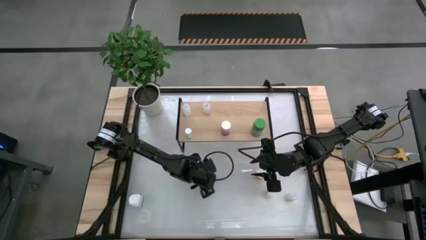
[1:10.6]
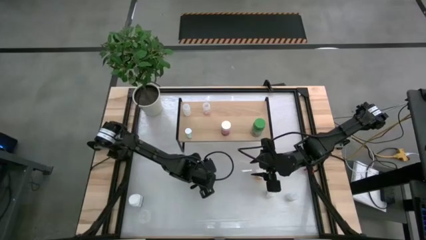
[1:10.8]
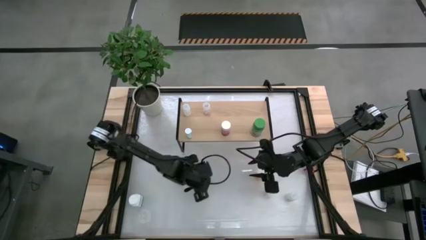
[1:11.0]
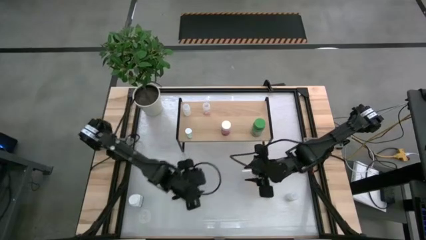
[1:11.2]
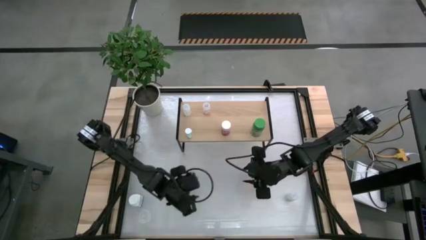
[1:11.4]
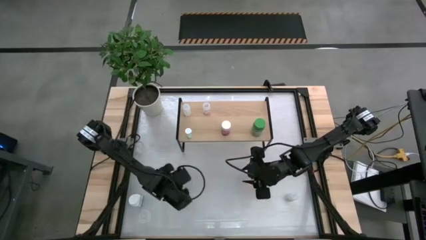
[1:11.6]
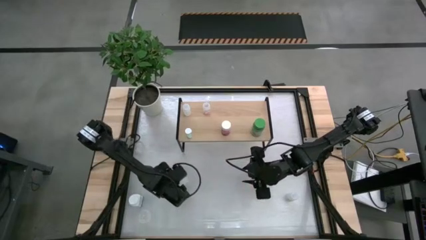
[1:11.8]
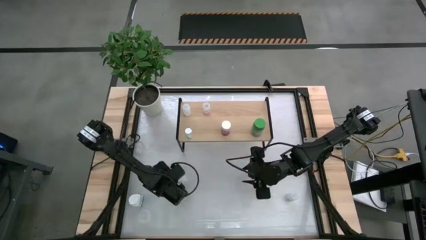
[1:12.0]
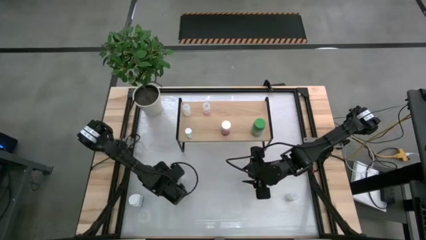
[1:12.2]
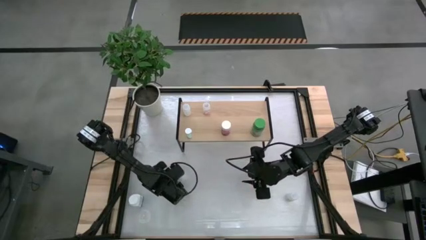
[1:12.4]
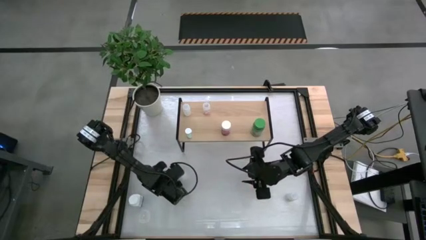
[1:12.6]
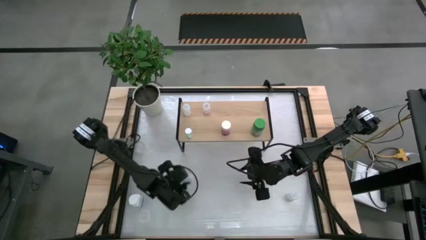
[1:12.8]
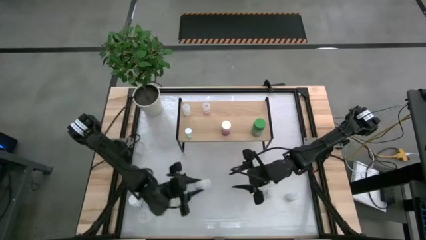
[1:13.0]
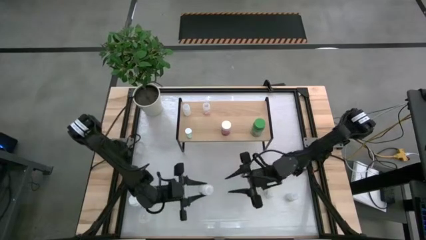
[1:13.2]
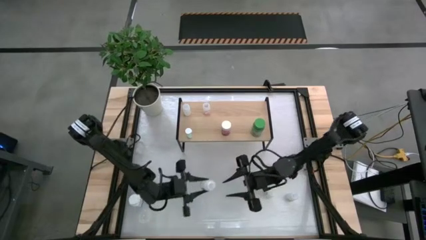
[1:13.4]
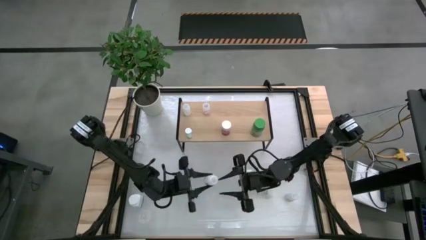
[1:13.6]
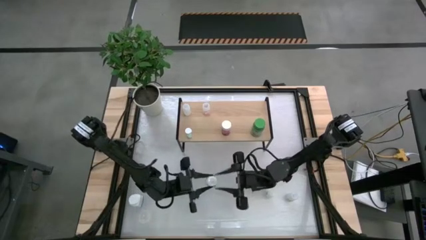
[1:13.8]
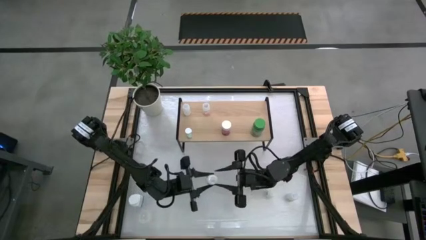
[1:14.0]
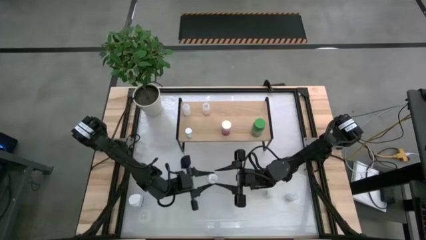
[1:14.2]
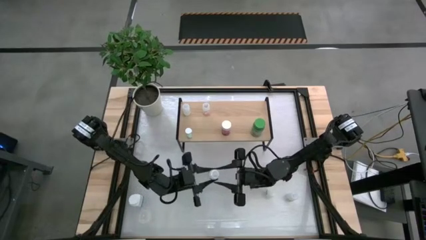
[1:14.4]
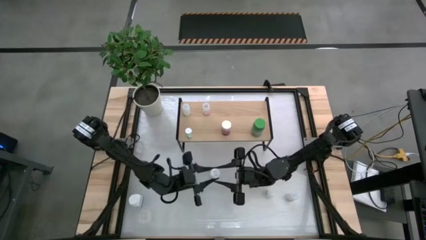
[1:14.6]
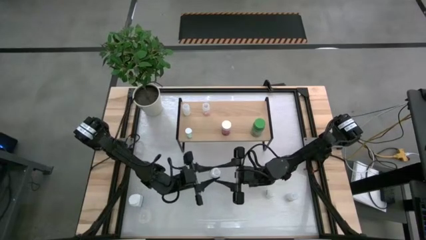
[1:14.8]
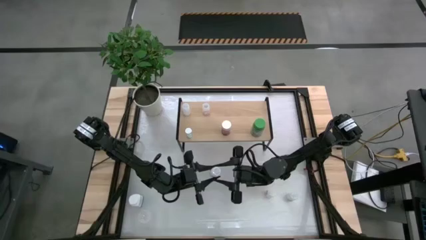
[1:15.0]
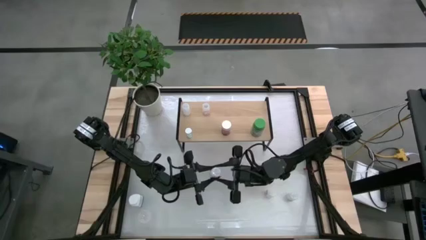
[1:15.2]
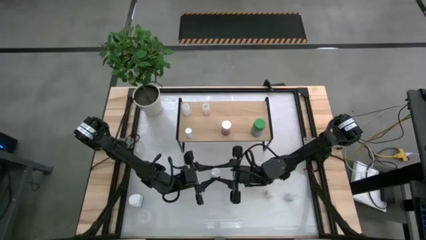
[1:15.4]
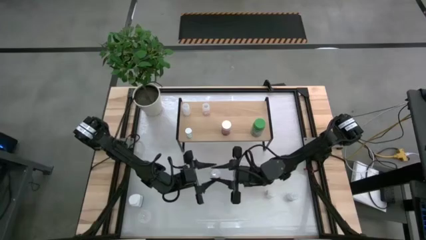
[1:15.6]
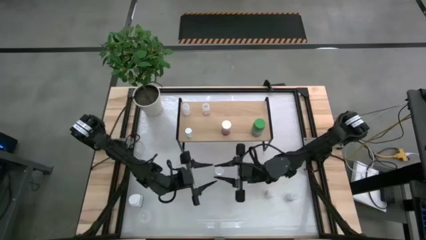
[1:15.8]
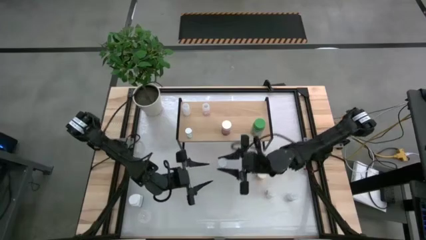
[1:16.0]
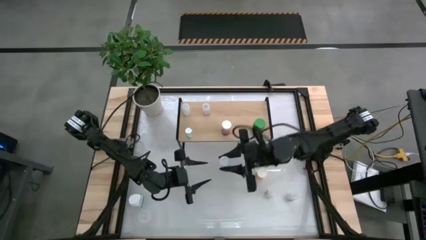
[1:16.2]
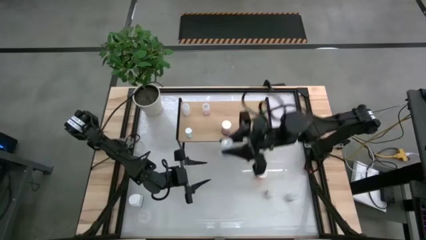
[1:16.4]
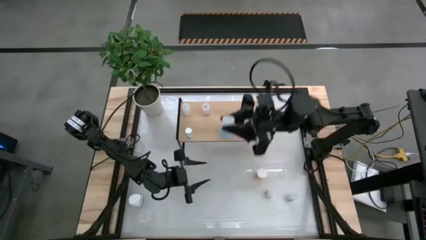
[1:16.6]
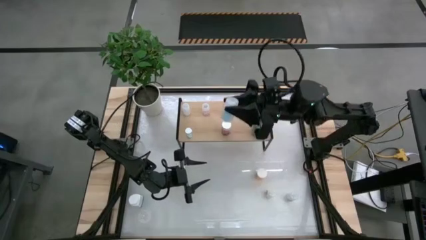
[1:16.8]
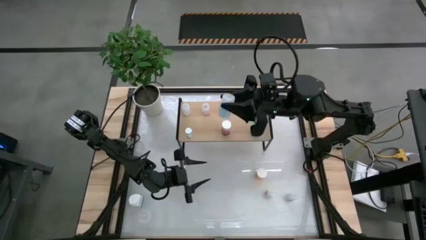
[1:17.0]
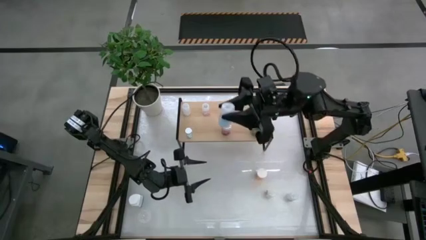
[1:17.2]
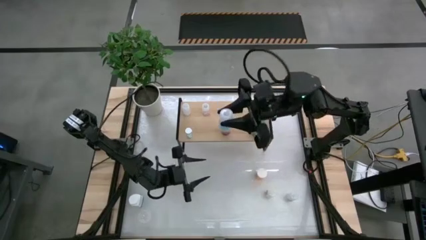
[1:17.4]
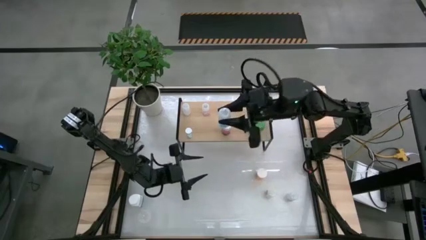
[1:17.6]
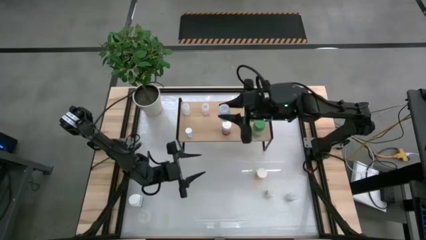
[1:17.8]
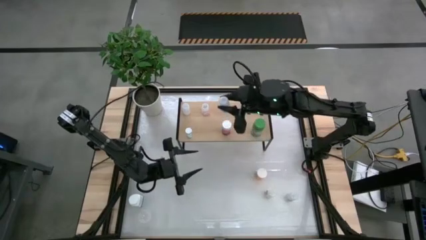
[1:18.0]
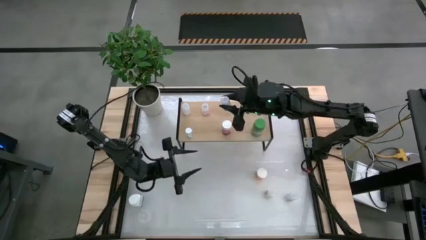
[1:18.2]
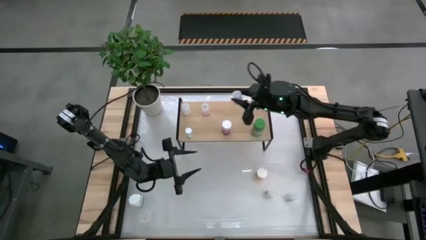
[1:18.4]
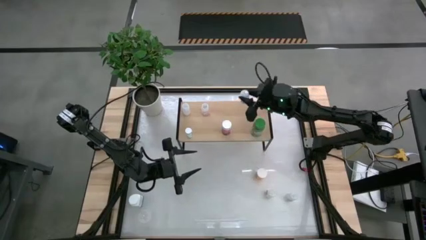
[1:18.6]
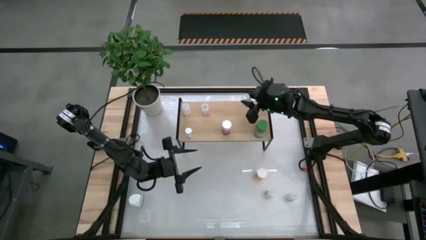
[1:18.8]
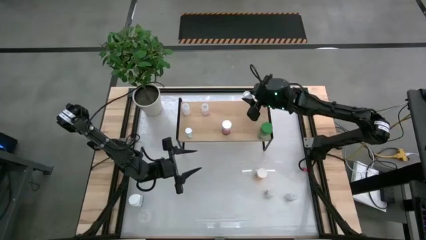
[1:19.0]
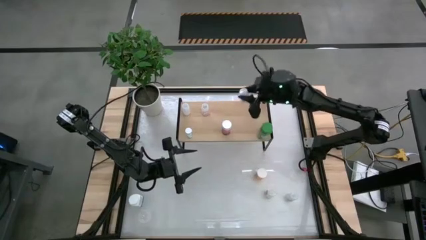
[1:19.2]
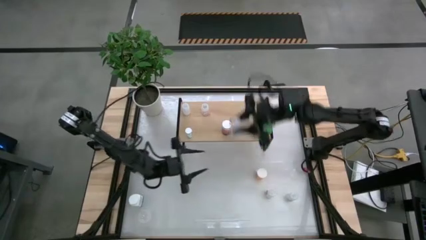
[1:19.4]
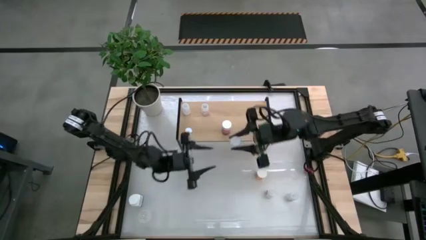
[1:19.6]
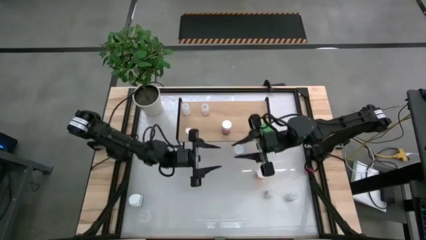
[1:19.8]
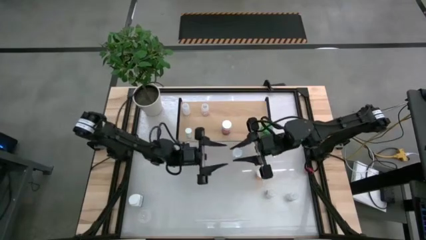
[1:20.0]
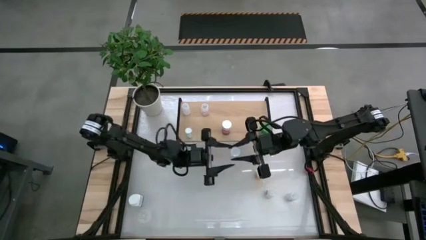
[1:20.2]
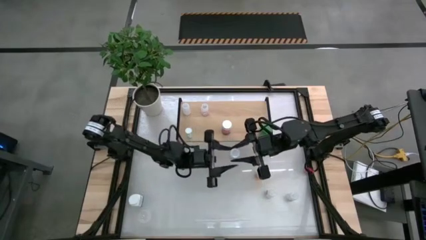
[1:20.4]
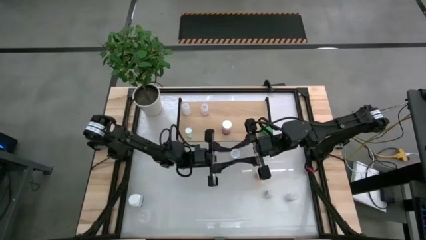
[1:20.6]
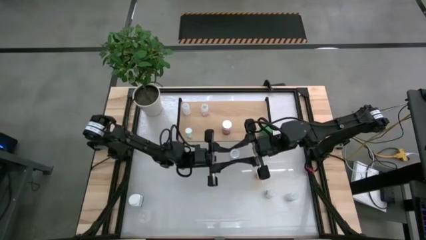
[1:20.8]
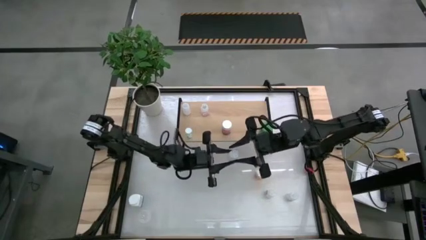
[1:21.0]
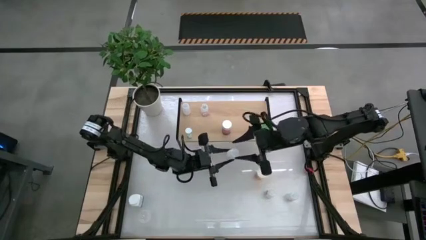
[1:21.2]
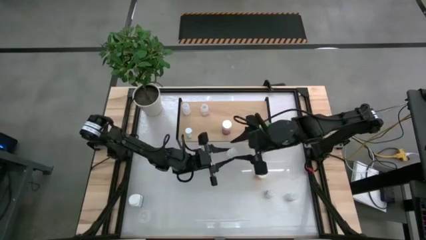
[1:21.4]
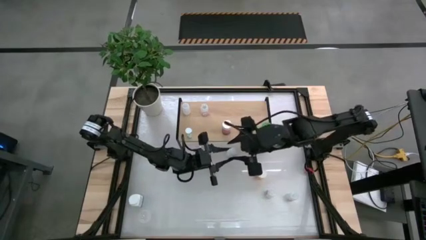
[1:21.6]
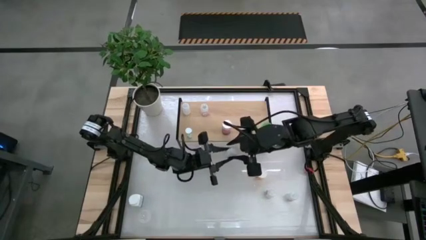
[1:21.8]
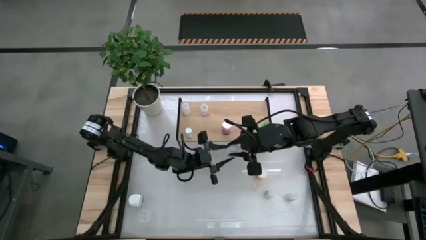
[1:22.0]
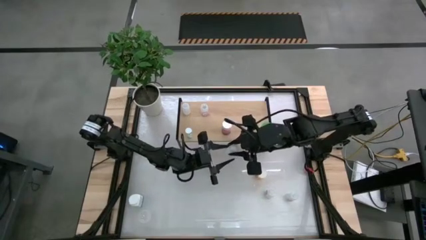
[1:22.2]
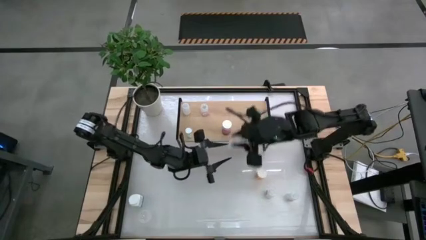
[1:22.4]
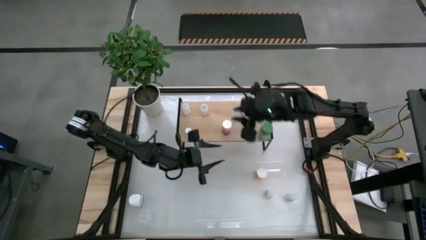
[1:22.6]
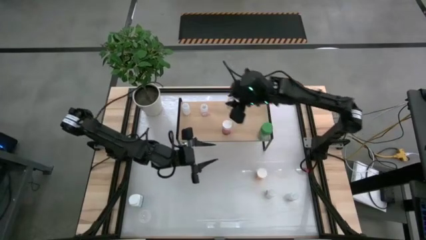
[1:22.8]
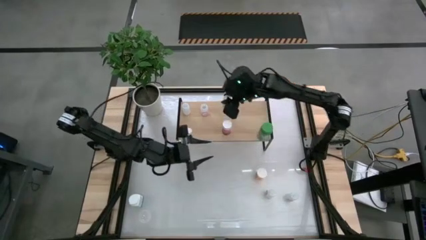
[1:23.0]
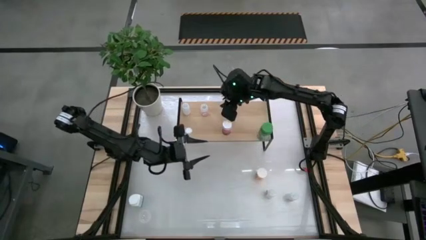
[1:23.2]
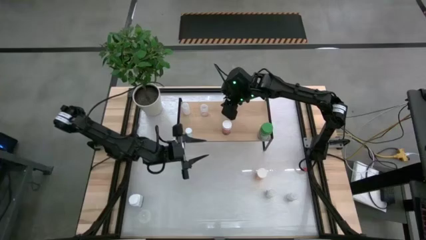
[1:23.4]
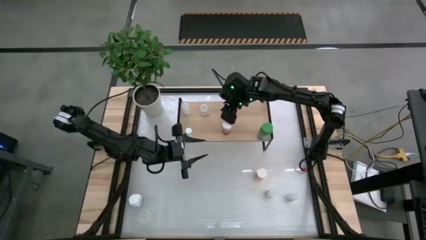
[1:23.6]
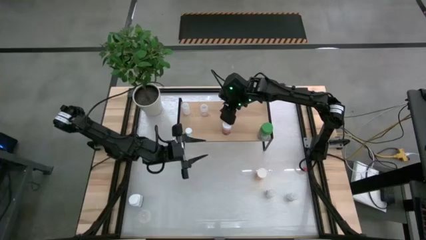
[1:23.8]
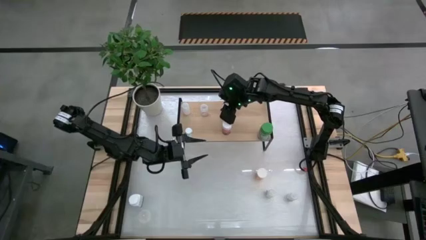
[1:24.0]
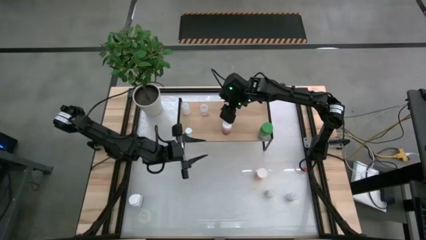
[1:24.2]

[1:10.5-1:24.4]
Task: Pick and place medicine bottles onto shelf by color
Put the transparent pill bottle on the shelf

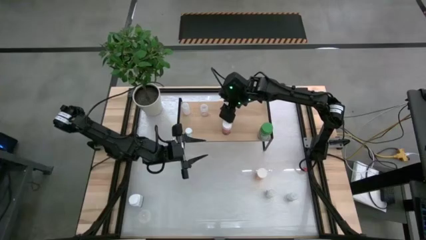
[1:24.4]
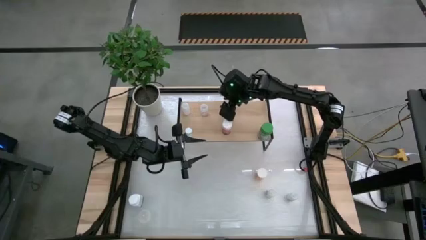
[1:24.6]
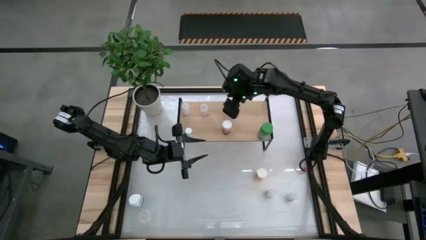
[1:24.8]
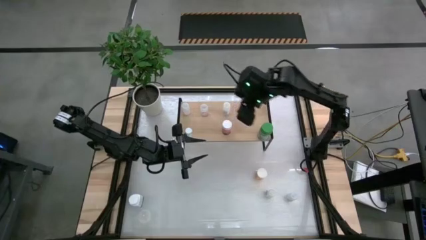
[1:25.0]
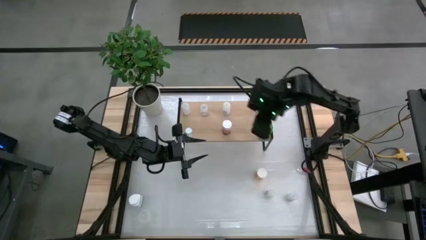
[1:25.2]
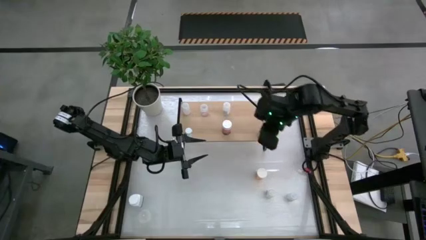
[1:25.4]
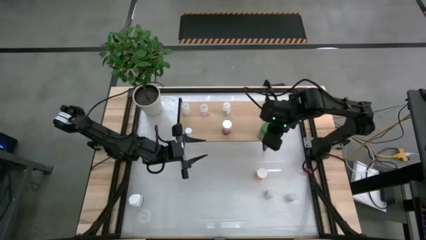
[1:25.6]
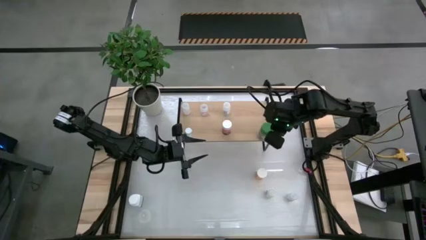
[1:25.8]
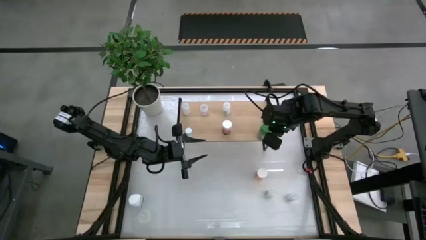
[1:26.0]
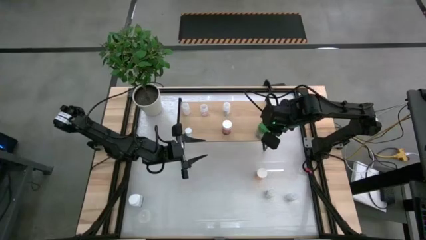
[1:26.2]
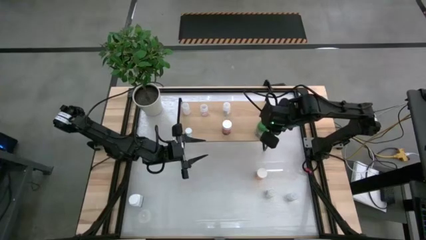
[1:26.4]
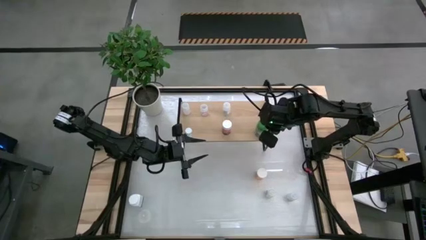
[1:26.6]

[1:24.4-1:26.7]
Adjust the green pill bottle on the shelf
